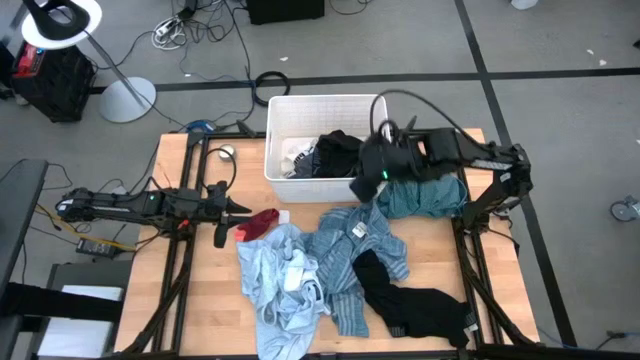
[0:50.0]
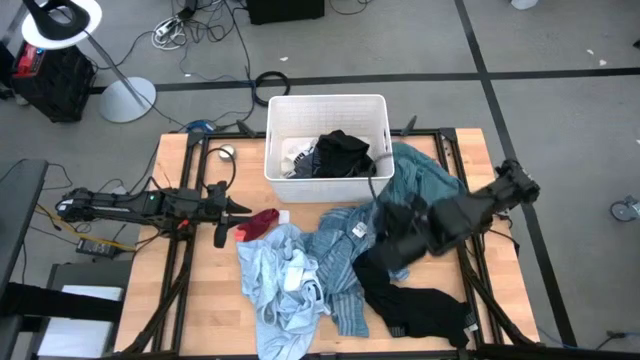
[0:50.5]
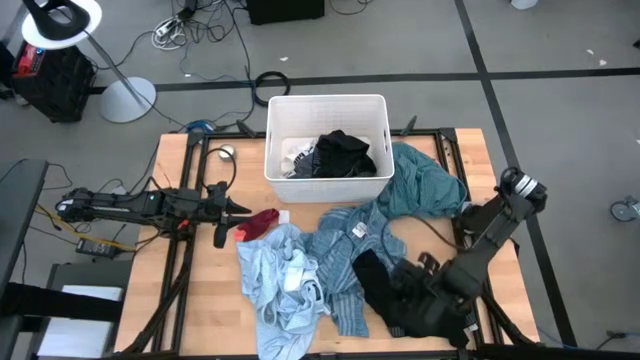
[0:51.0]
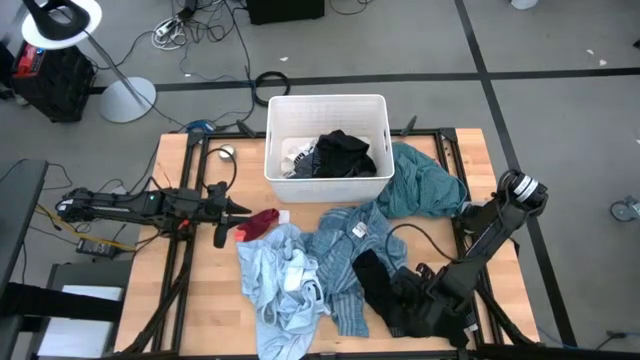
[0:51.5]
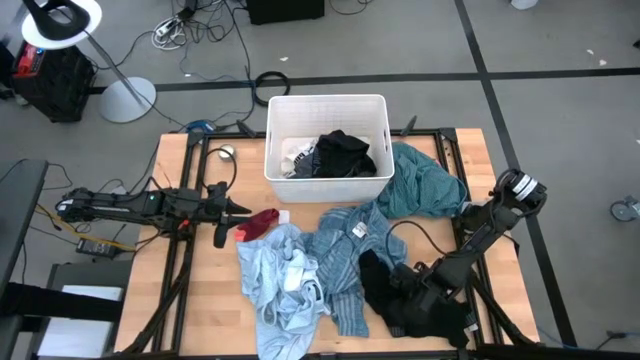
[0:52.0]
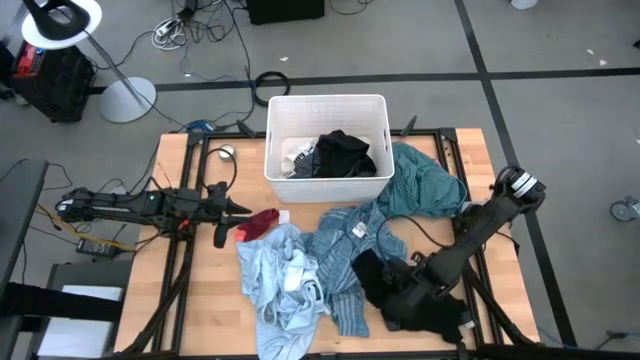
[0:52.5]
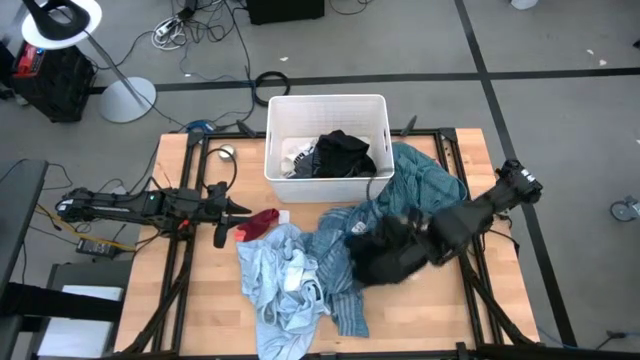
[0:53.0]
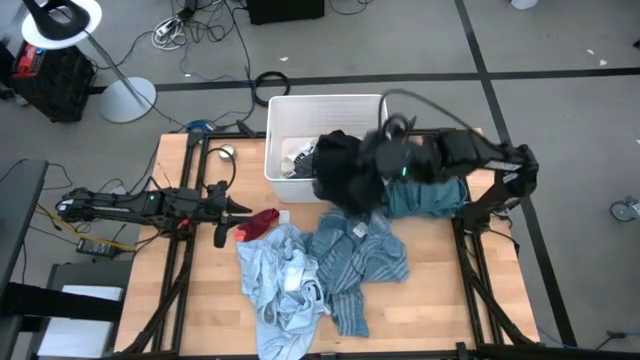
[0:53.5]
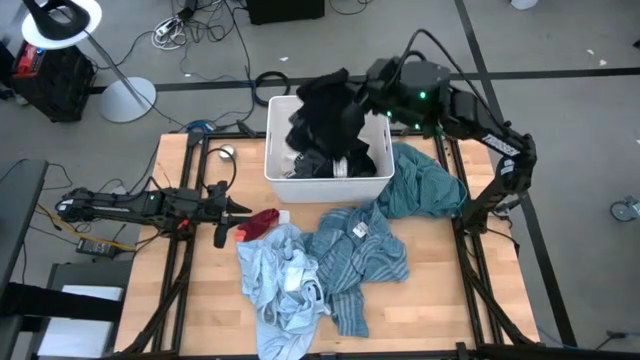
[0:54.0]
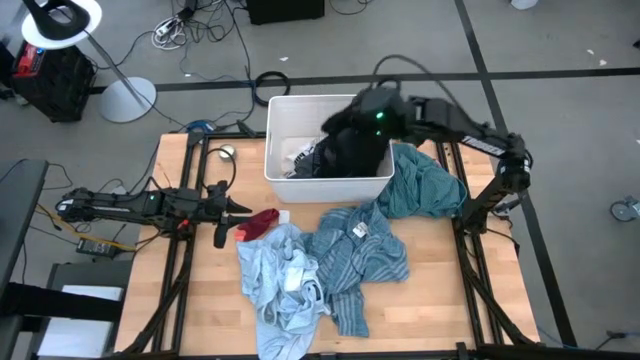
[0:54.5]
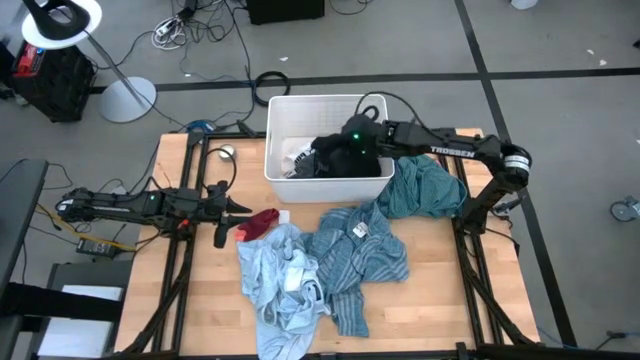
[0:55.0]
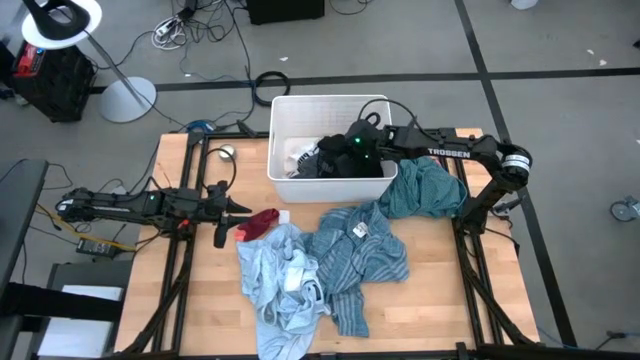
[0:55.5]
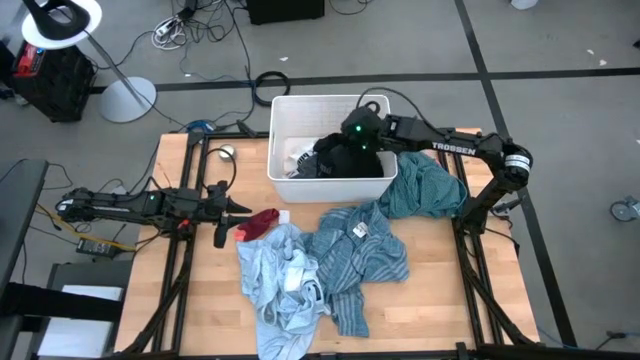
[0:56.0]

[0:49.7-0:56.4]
Task: Sort clothes
Put the black boxers into the laundry bin

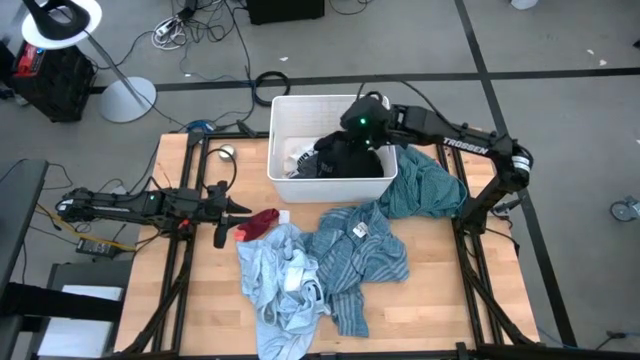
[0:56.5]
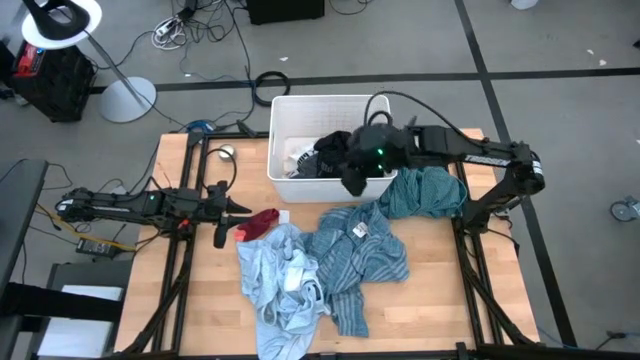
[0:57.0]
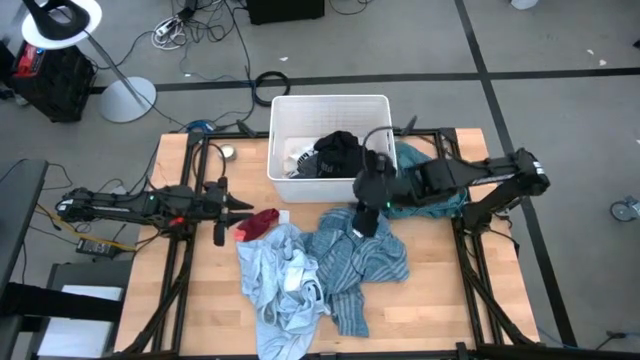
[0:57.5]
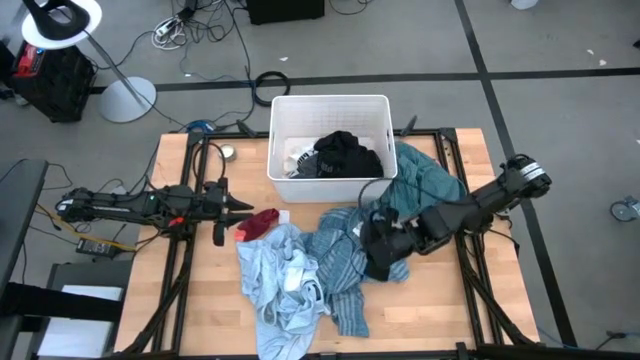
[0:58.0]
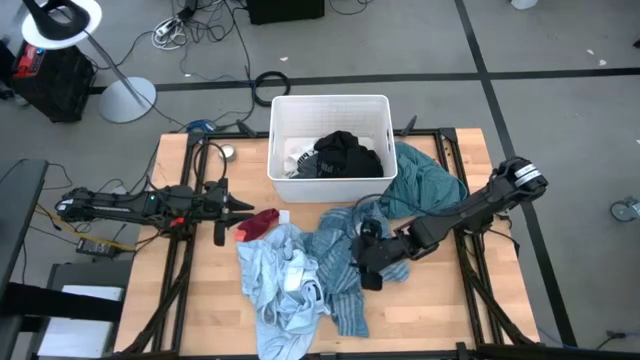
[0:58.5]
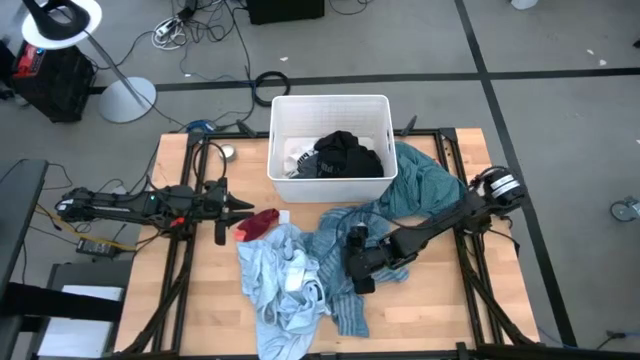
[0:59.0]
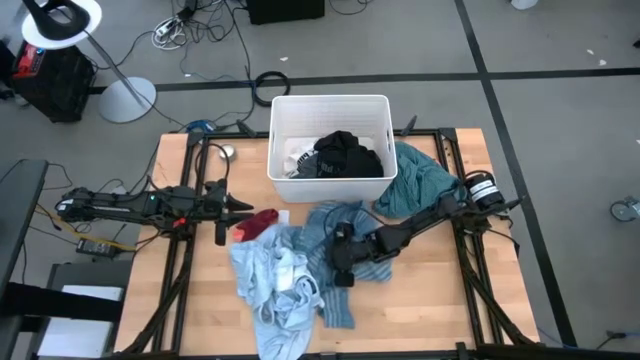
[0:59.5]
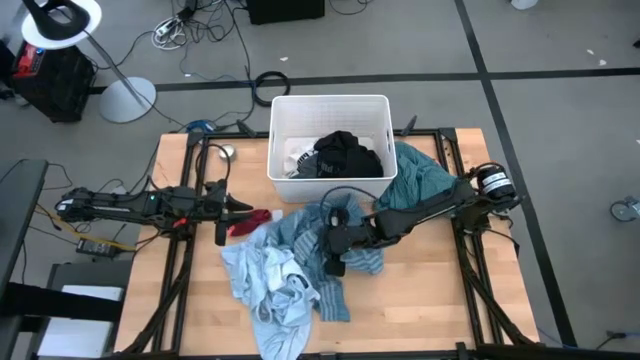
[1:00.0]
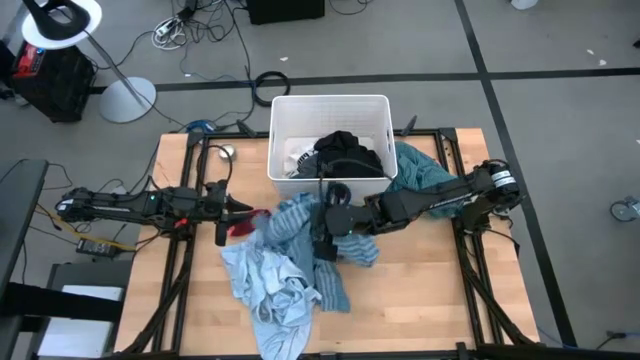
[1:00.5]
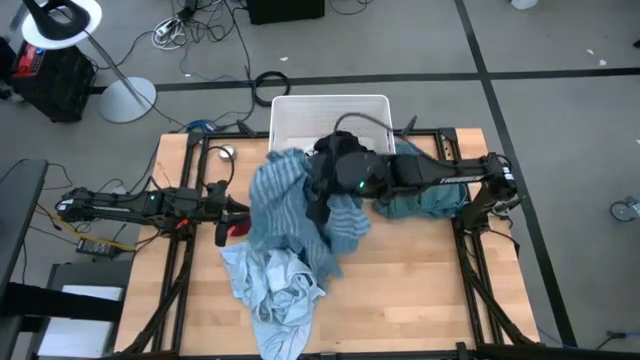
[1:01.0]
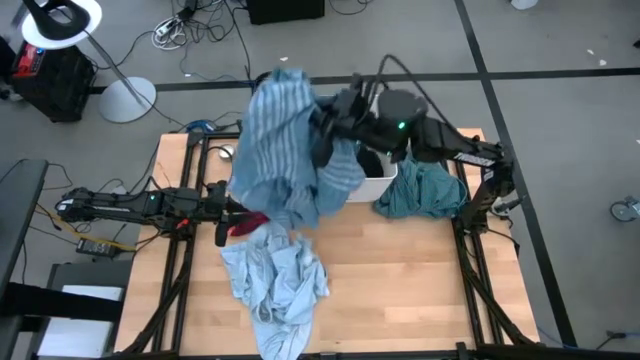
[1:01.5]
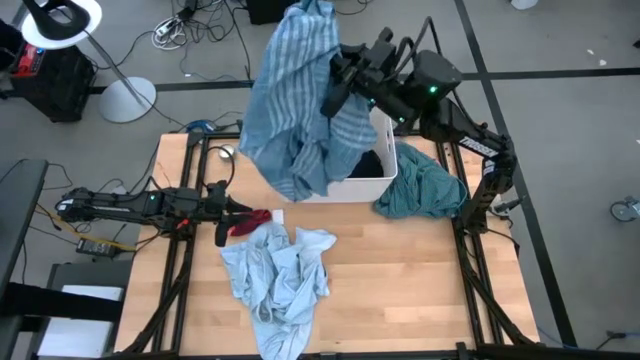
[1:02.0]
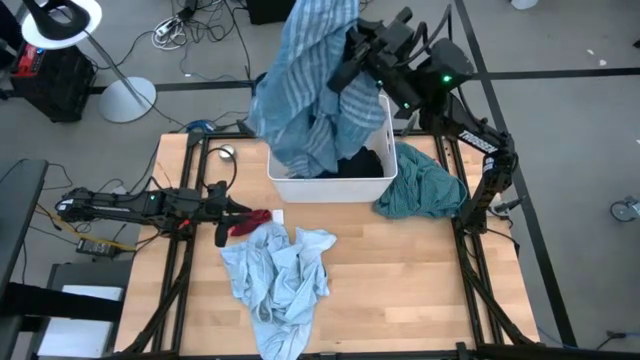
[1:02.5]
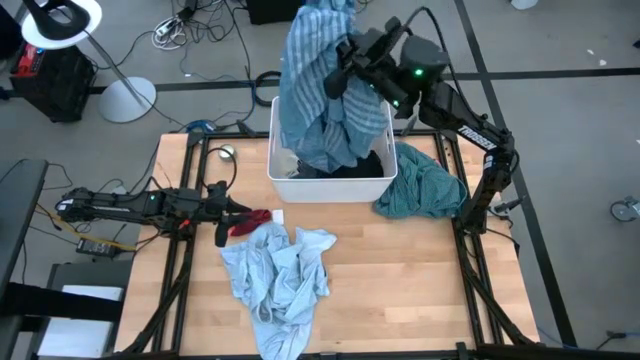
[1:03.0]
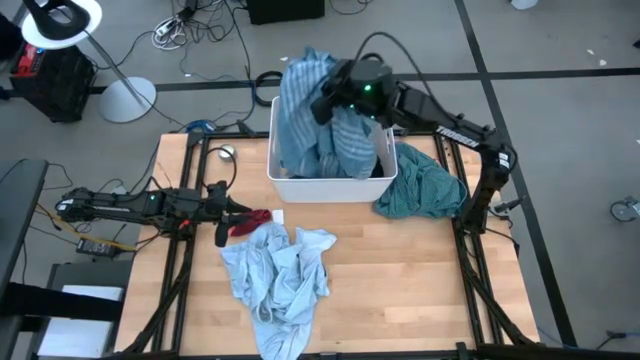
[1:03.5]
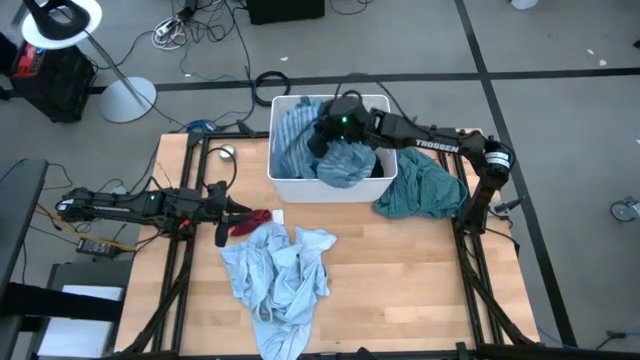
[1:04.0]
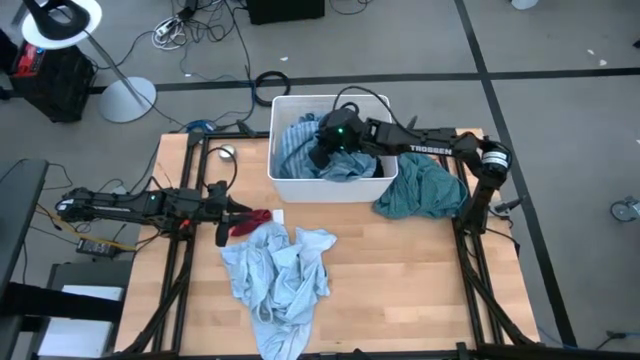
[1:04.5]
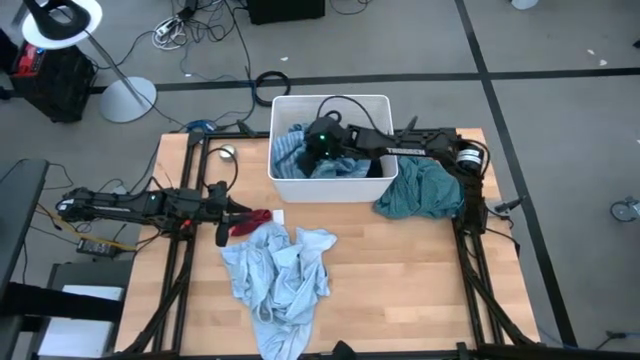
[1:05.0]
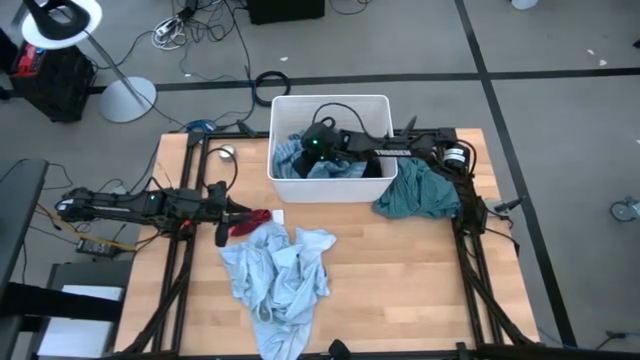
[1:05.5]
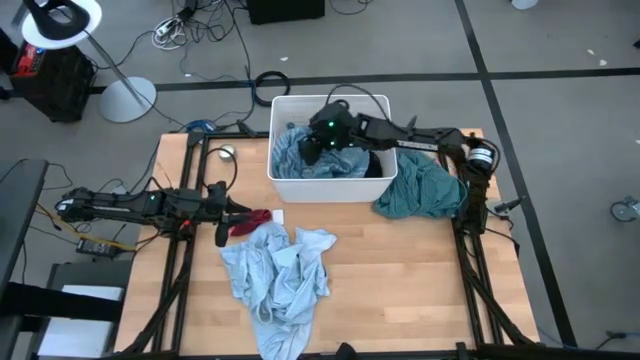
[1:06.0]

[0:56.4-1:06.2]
Put the blue shirts into the laundry bin

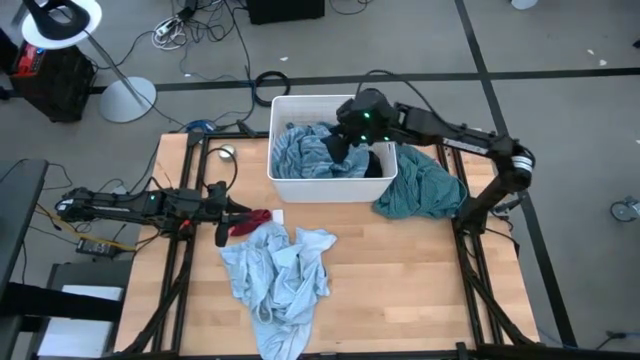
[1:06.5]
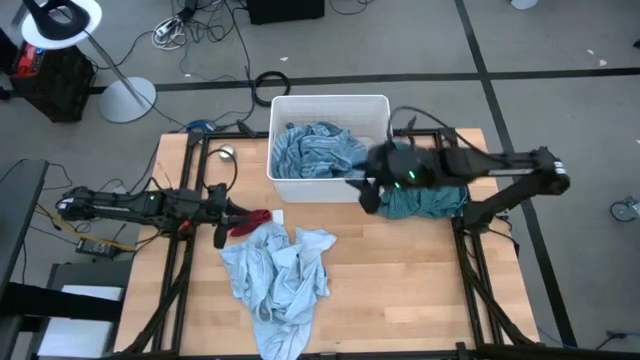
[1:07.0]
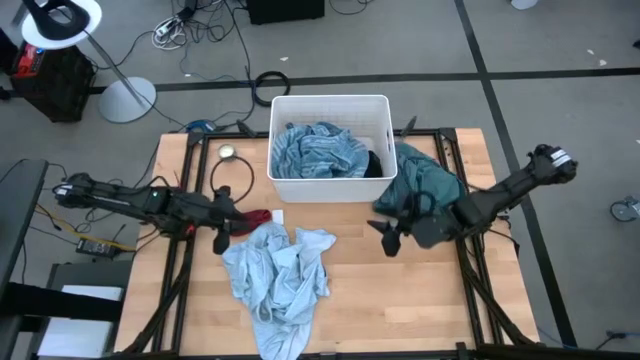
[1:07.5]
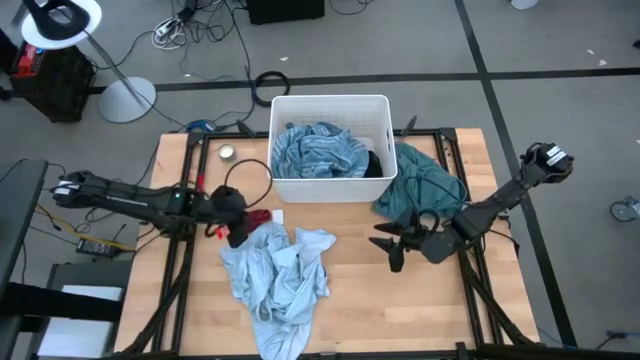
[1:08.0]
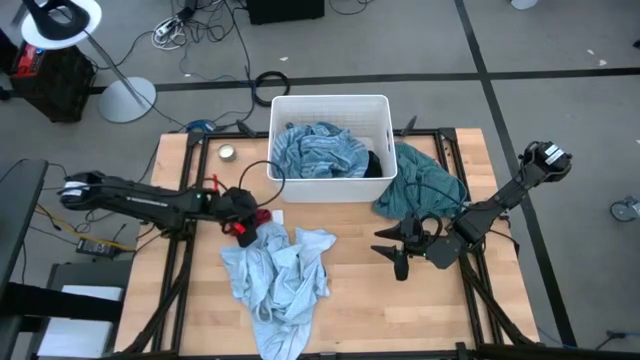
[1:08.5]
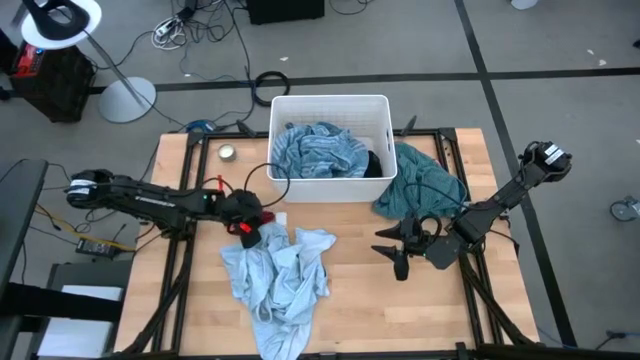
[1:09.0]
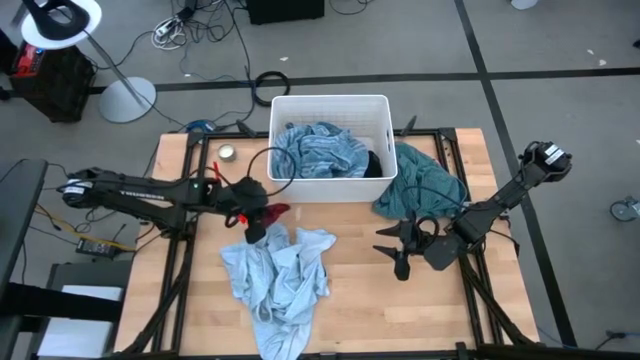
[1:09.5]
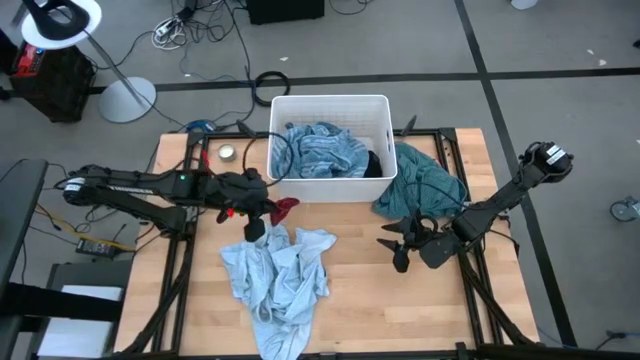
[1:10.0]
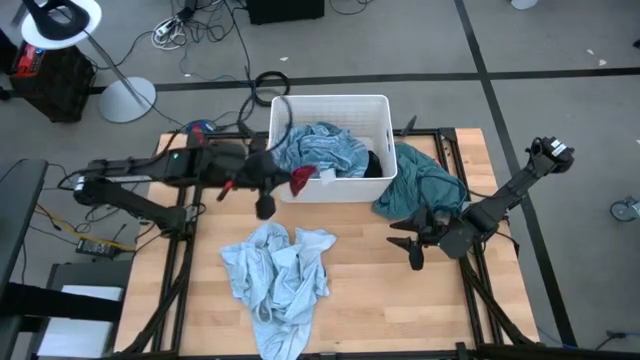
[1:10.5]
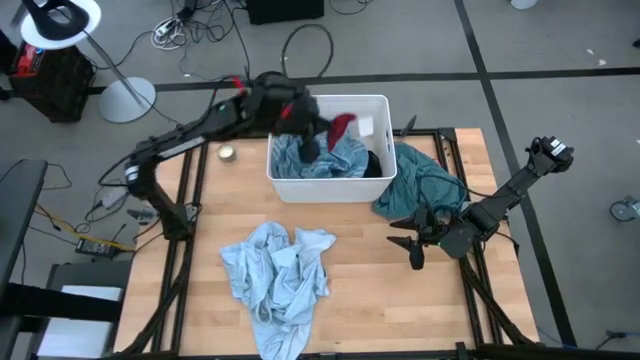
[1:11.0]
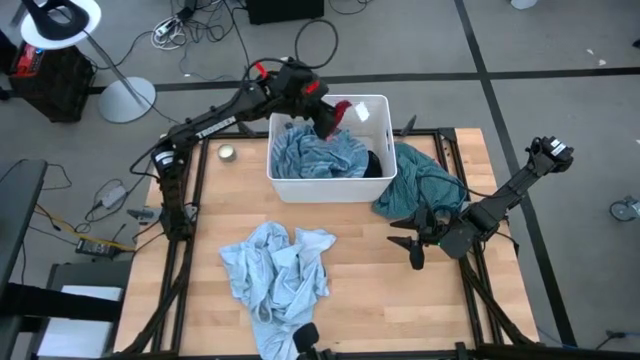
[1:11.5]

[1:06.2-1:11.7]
Put the red sock into the laundry bin

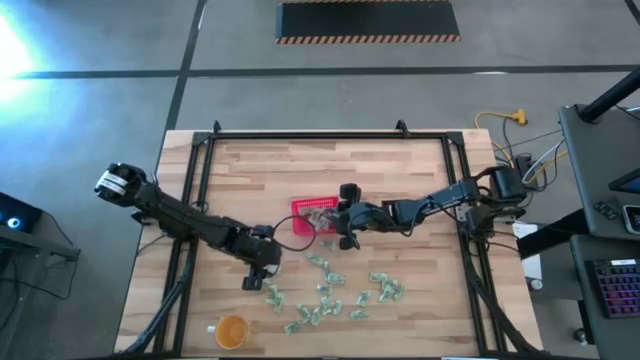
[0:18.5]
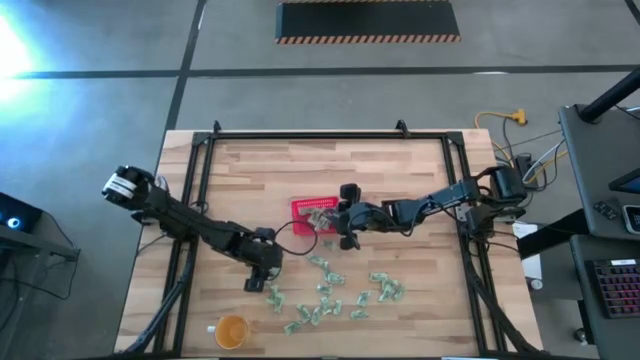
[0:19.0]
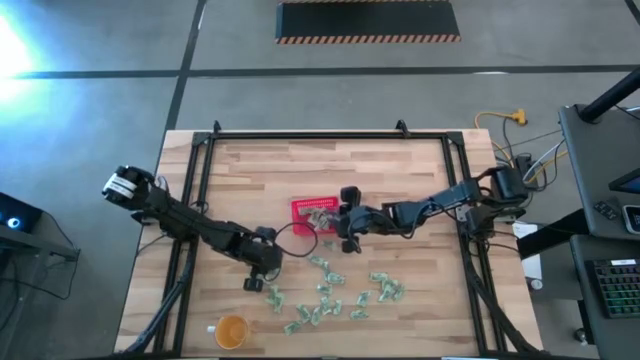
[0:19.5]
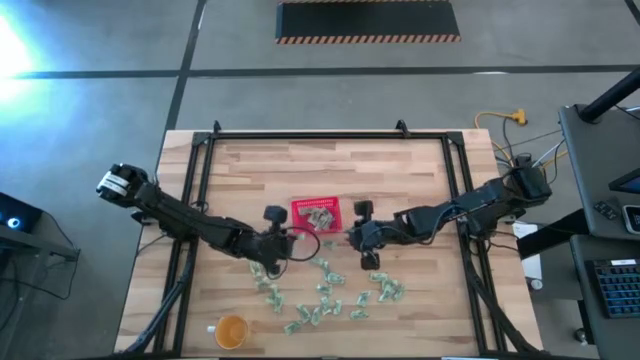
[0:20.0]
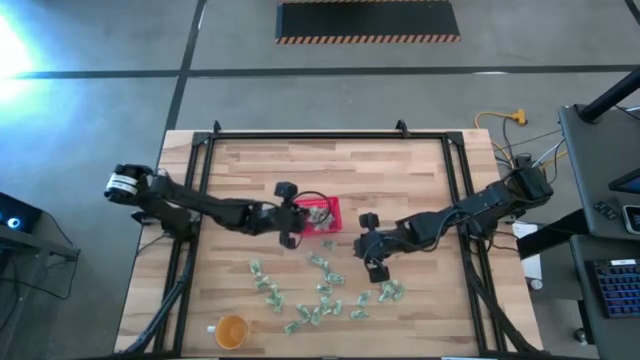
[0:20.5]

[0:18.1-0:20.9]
Task: Pick and place items into bin
Put the stevia packet into the red bin
